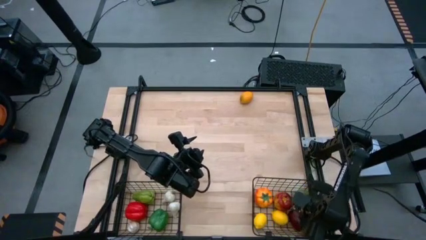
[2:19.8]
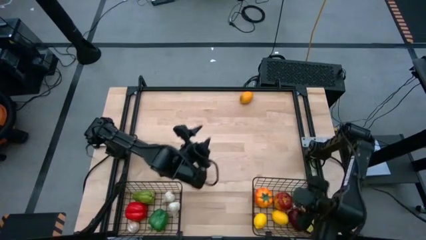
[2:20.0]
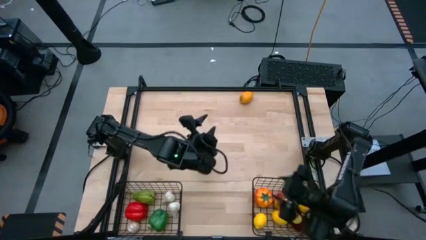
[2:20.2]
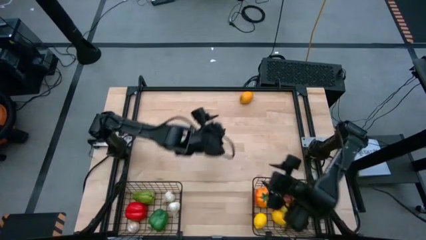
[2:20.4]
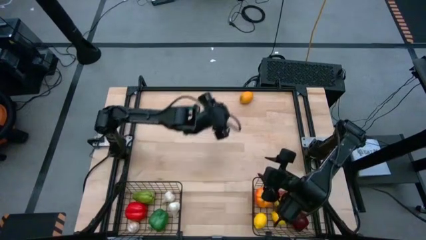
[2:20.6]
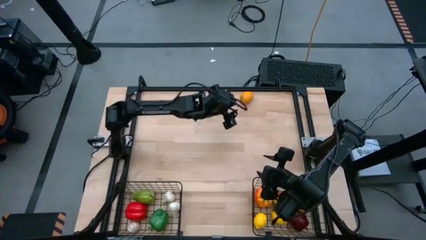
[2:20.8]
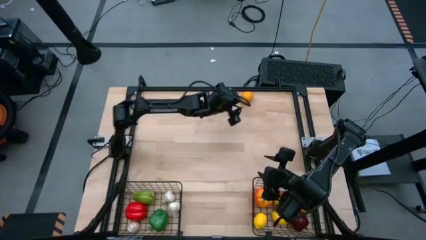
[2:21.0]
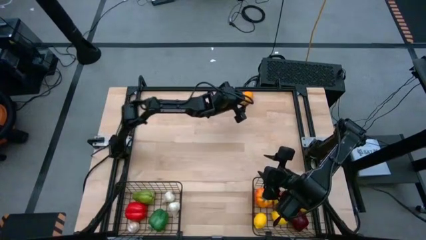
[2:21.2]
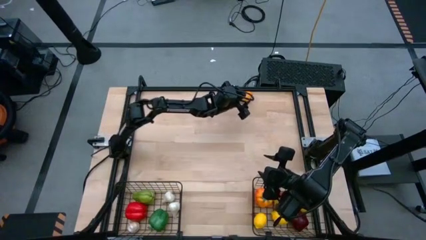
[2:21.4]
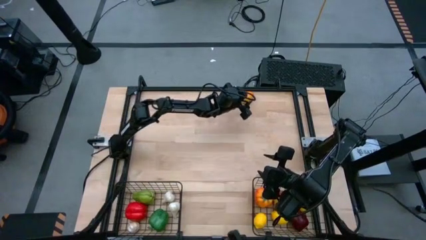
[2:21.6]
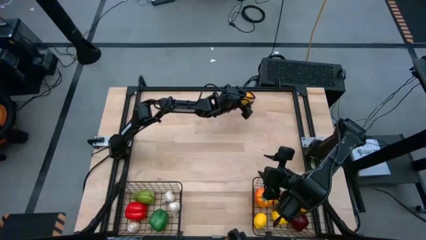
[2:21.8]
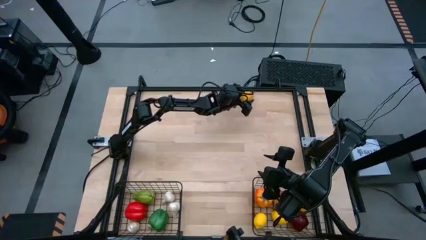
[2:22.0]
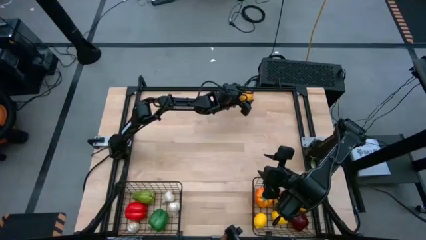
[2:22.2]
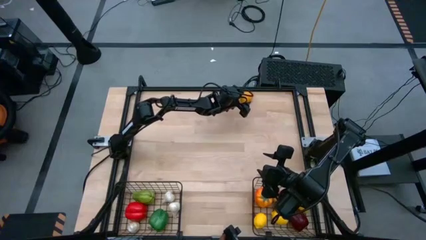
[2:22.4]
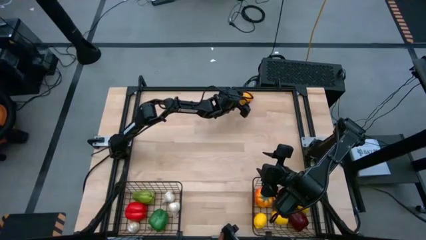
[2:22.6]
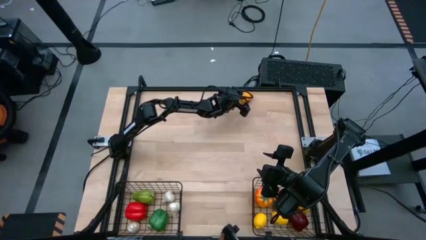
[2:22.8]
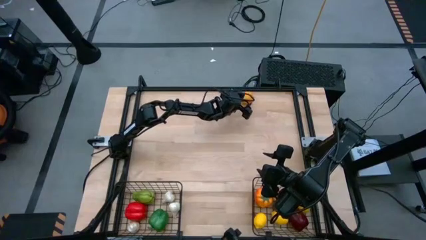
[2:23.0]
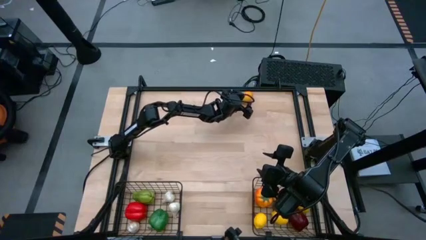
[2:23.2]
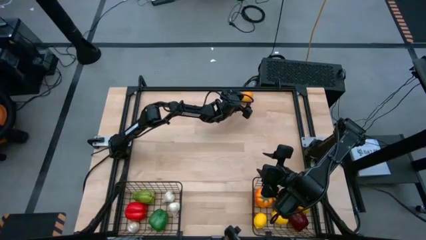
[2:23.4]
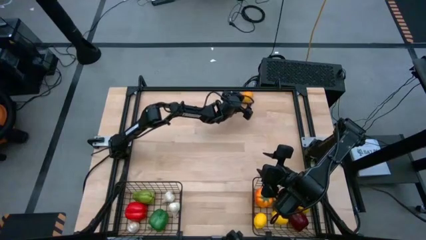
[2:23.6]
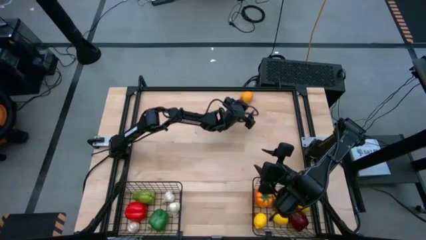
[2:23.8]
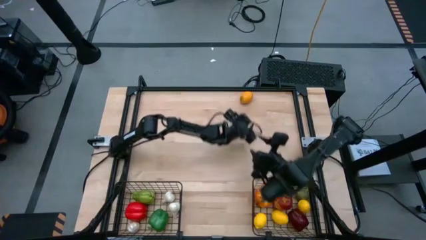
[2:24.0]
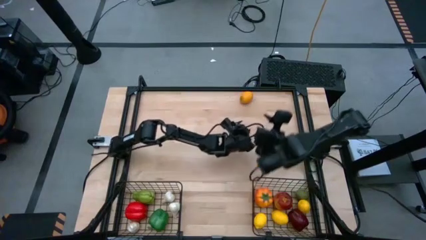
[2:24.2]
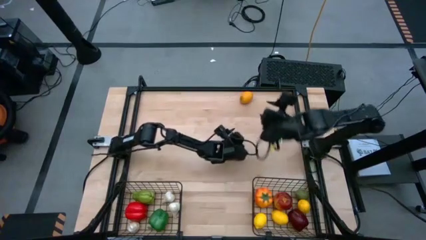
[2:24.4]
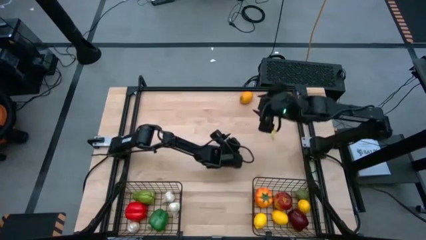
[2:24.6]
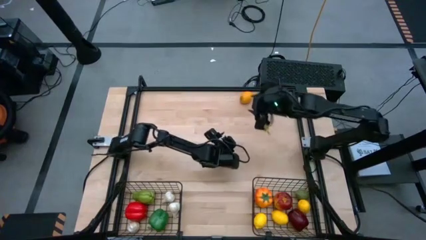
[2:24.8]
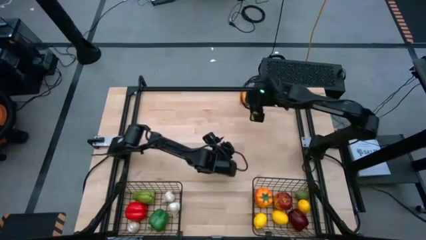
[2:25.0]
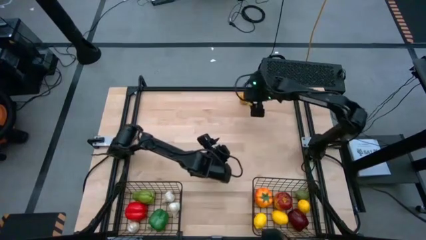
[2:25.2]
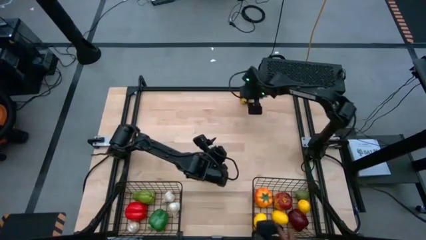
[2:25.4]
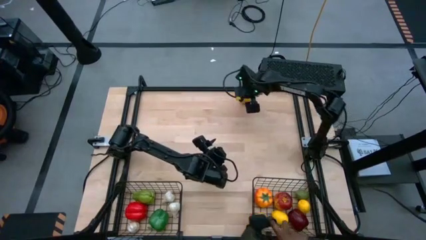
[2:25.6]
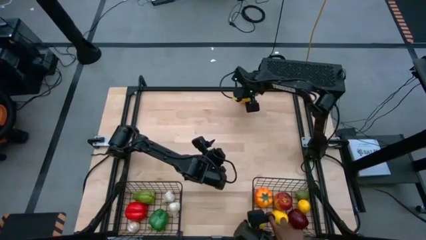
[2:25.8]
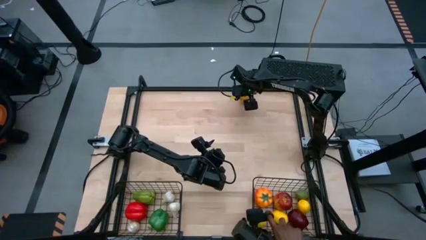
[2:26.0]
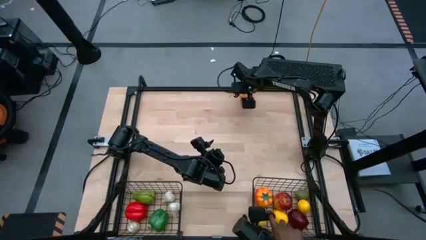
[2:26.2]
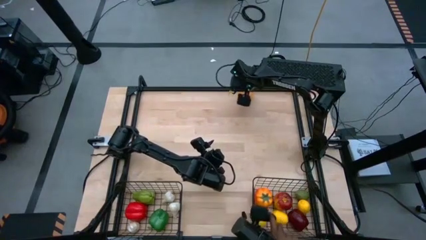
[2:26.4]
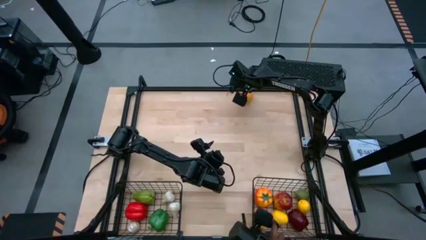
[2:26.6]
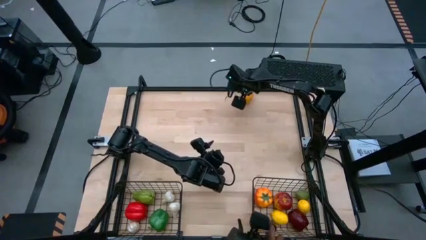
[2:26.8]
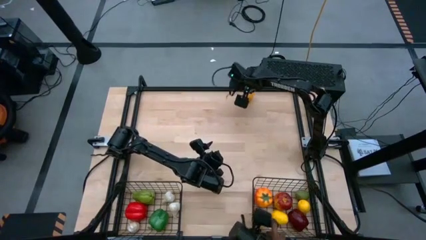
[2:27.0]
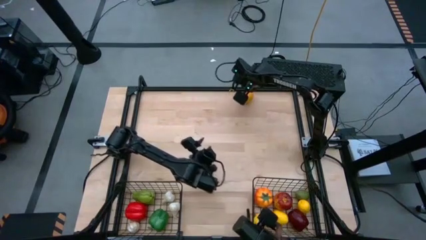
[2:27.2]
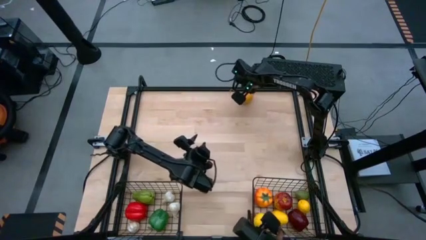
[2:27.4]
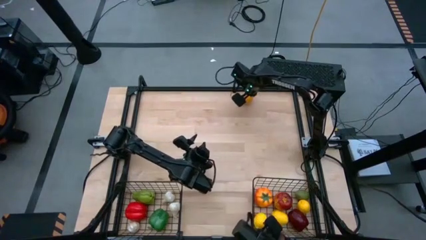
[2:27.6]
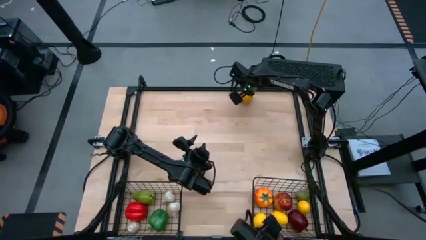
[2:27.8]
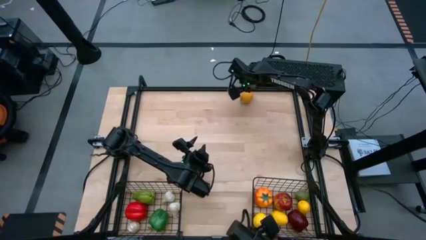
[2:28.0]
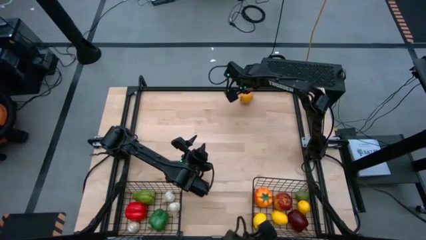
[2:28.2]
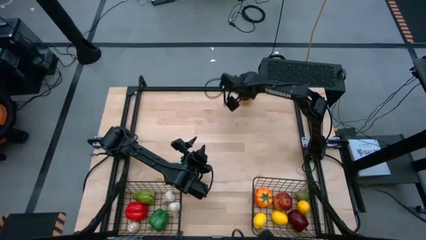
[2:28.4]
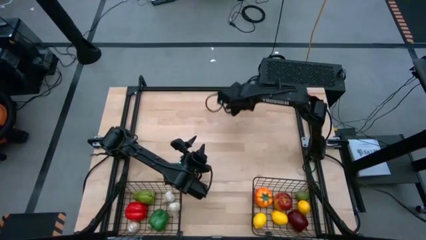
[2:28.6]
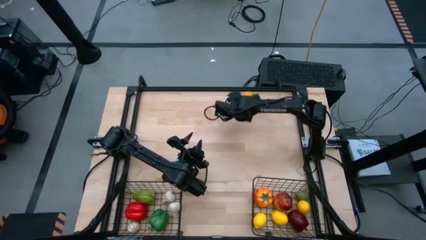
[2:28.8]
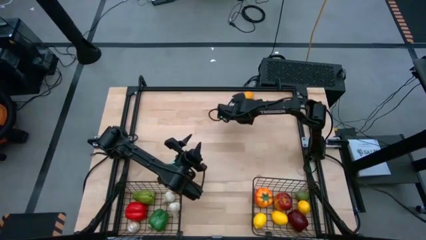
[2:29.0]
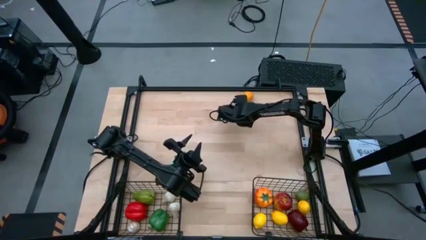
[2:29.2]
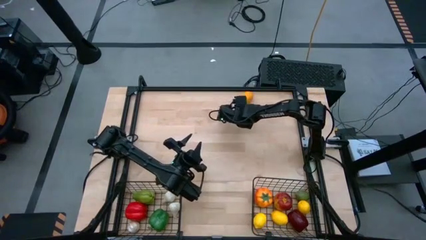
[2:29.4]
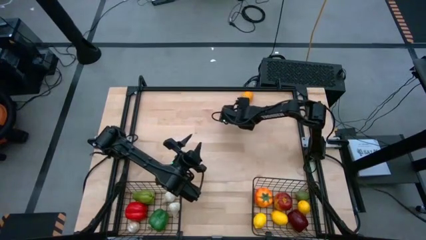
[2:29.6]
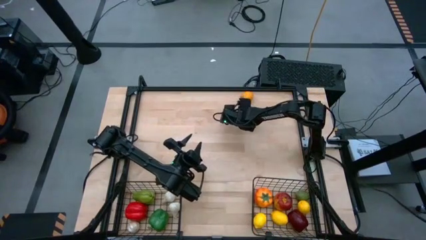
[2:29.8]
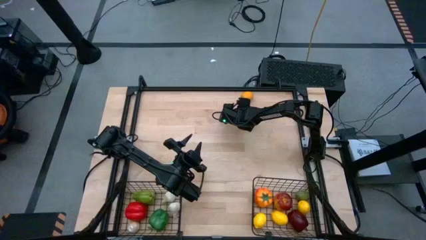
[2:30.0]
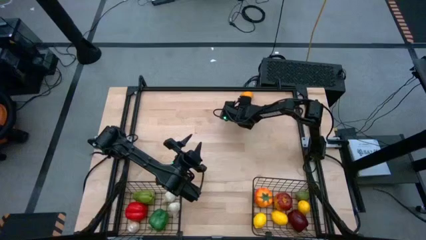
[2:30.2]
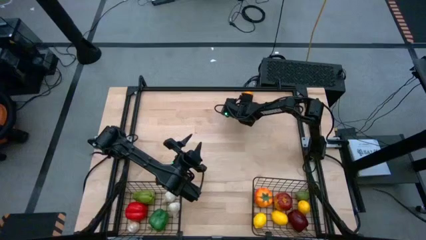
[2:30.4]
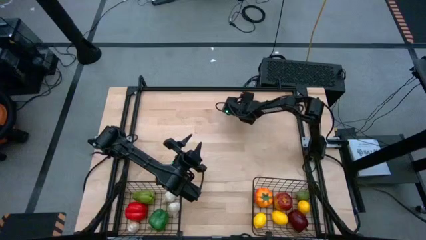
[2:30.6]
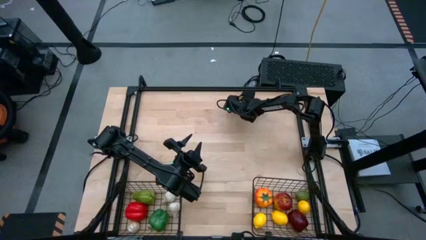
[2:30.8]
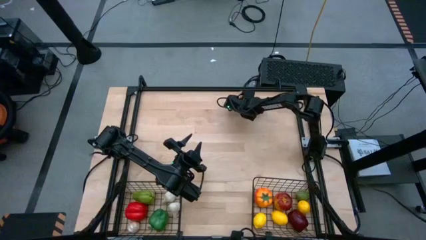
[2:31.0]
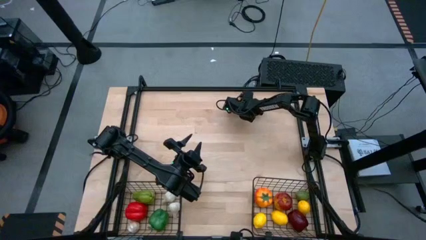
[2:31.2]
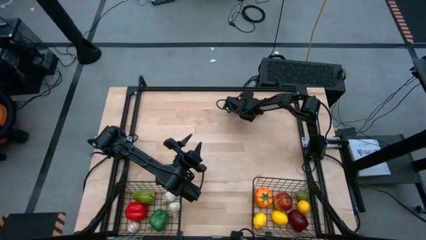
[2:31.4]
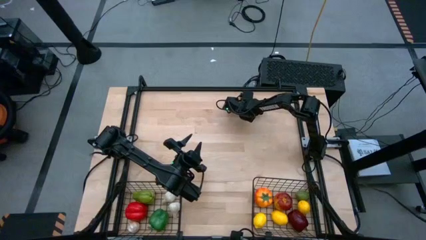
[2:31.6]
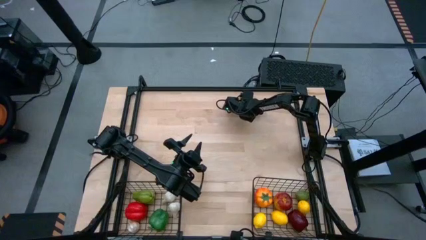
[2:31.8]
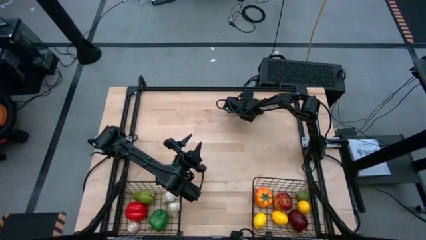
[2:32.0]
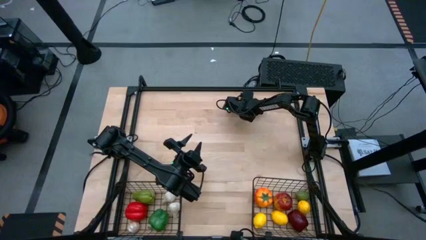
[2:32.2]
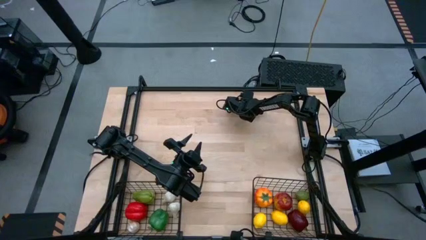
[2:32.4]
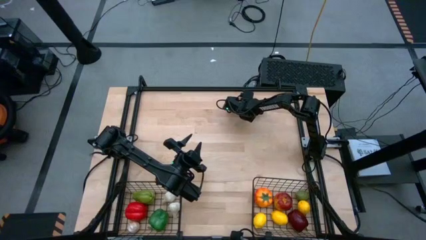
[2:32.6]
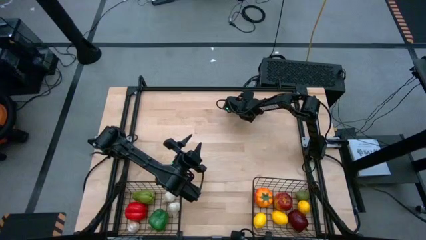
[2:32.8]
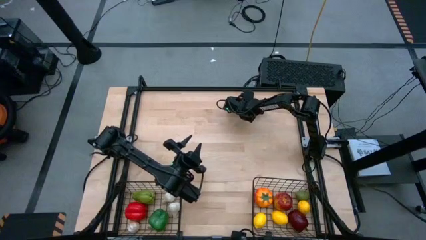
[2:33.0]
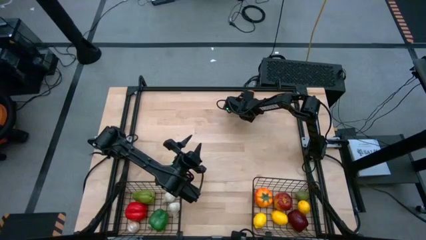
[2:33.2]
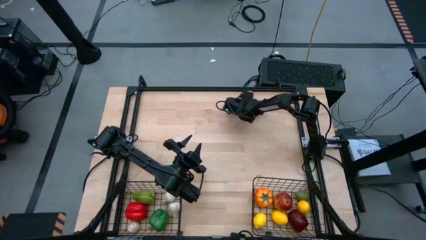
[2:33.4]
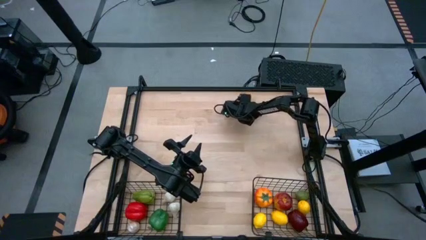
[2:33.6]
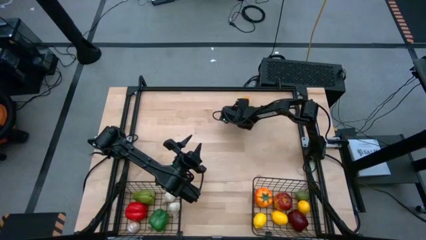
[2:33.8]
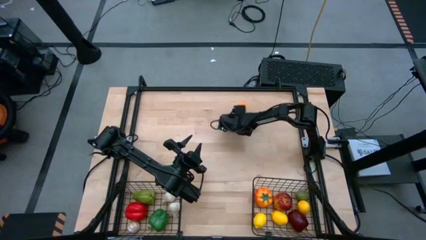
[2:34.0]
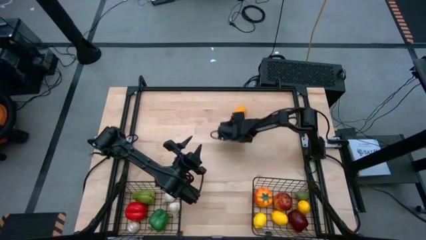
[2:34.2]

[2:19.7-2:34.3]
Task: Sort produce into baskets
Put the yellow lemon into the right black wire basket
